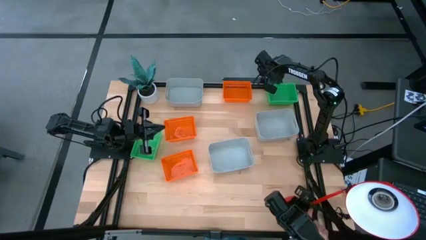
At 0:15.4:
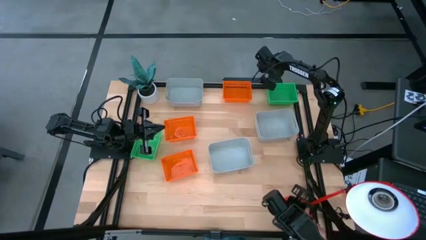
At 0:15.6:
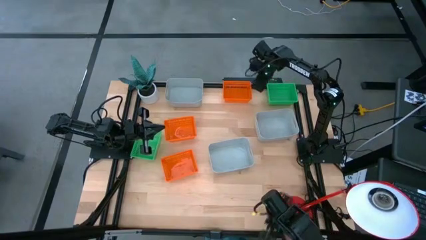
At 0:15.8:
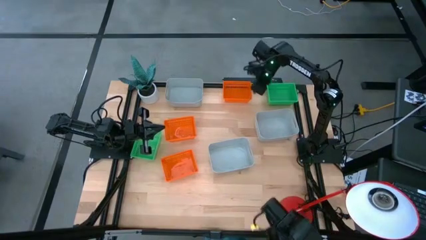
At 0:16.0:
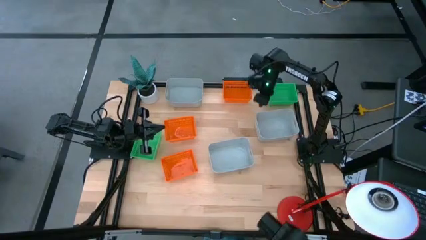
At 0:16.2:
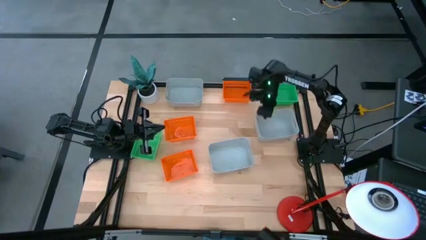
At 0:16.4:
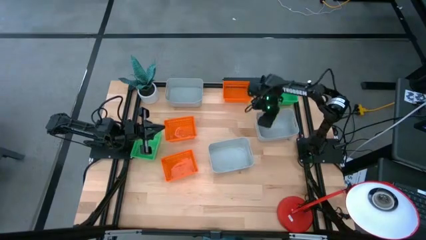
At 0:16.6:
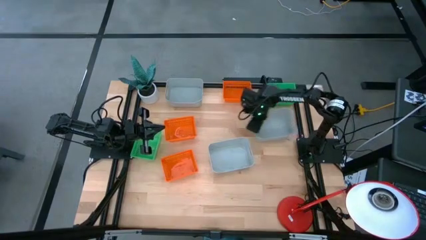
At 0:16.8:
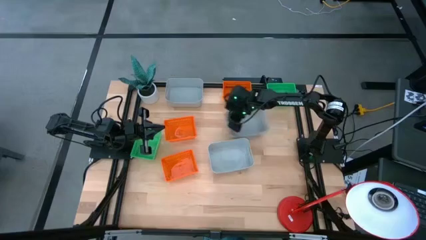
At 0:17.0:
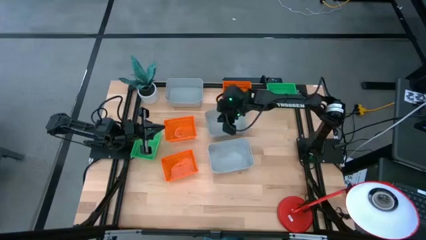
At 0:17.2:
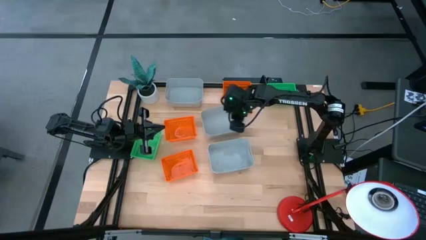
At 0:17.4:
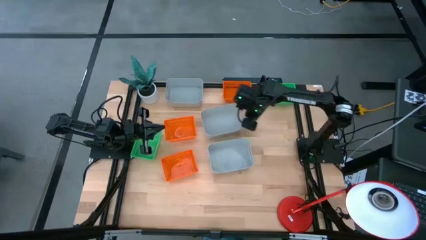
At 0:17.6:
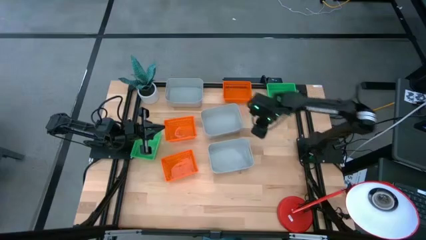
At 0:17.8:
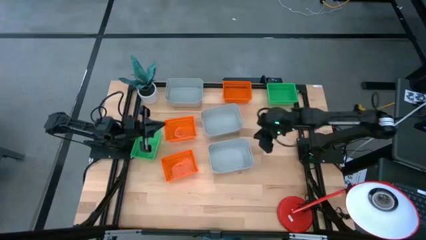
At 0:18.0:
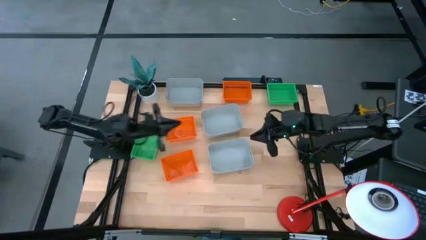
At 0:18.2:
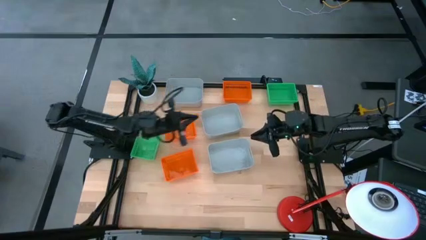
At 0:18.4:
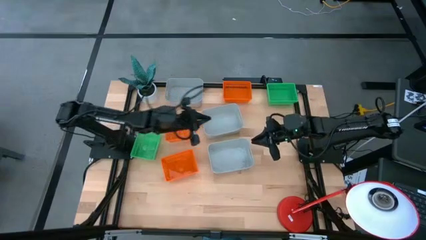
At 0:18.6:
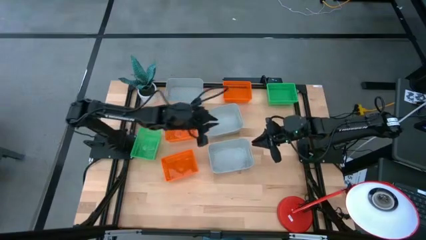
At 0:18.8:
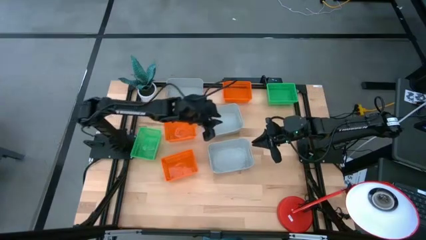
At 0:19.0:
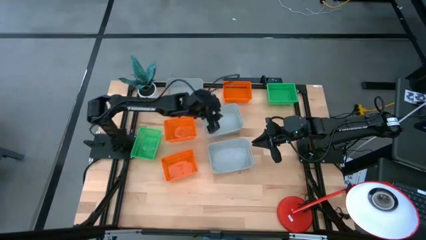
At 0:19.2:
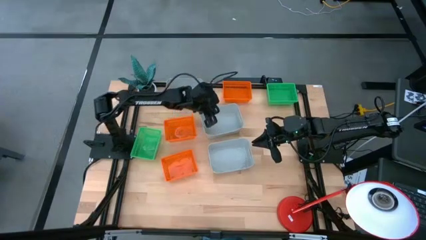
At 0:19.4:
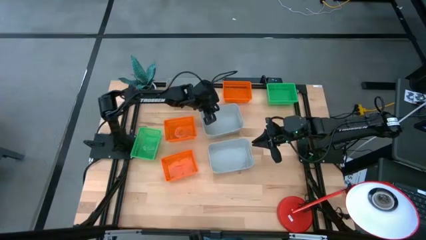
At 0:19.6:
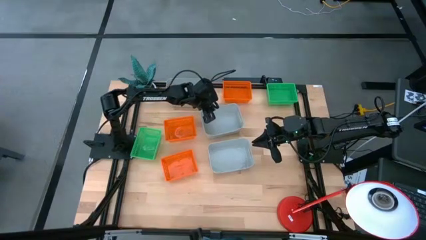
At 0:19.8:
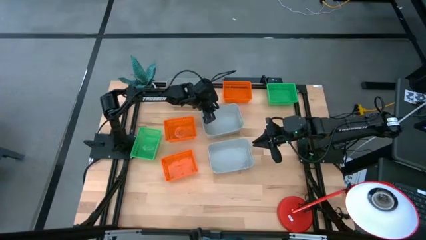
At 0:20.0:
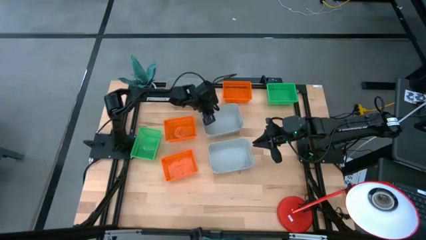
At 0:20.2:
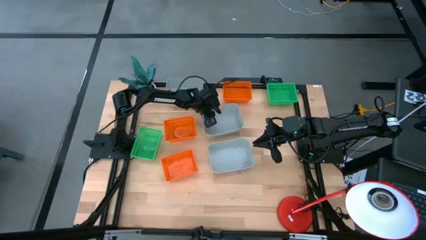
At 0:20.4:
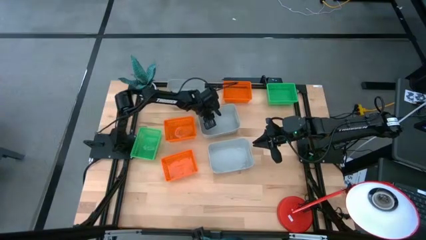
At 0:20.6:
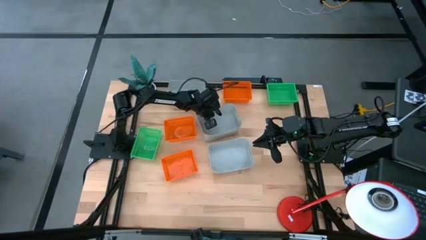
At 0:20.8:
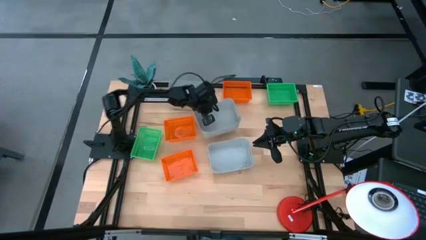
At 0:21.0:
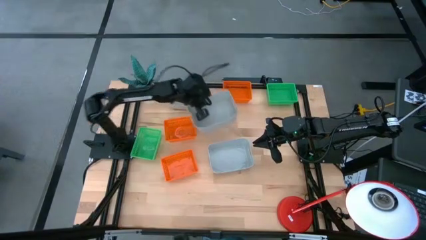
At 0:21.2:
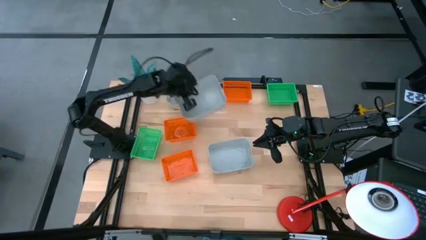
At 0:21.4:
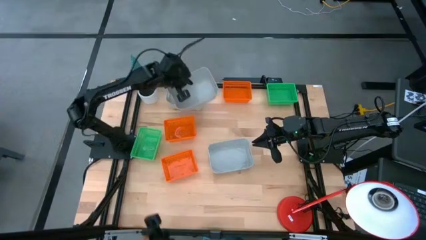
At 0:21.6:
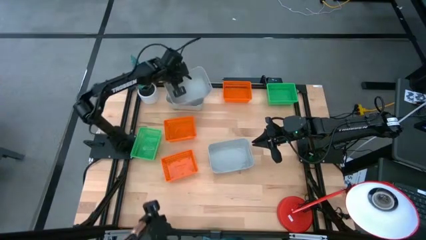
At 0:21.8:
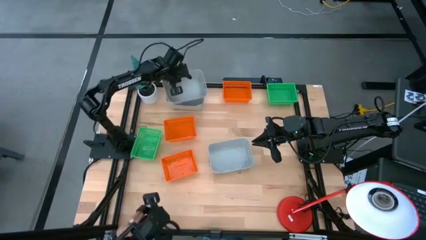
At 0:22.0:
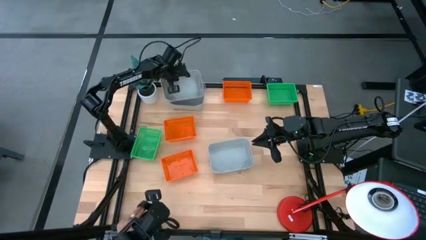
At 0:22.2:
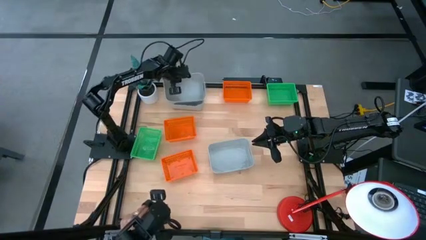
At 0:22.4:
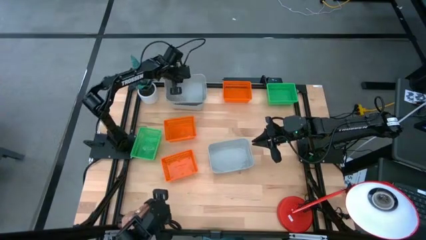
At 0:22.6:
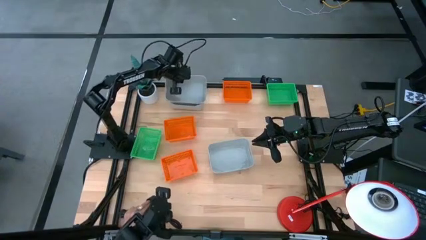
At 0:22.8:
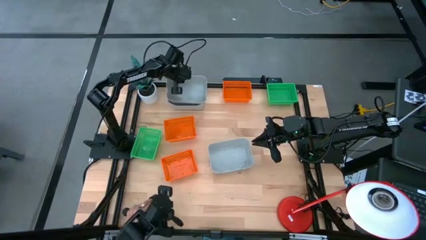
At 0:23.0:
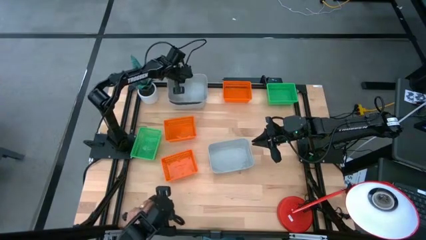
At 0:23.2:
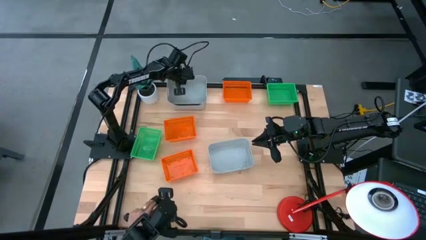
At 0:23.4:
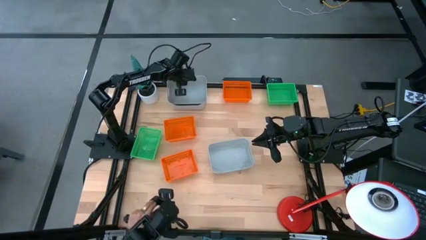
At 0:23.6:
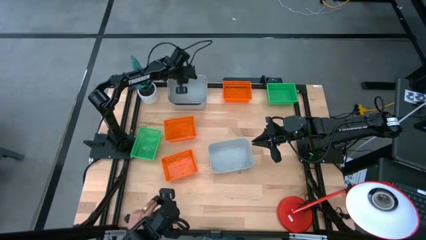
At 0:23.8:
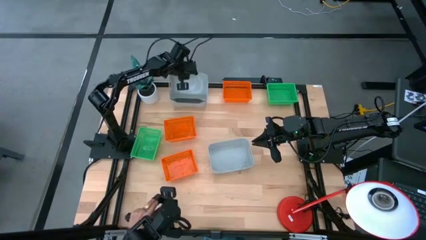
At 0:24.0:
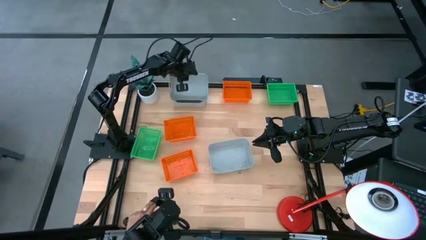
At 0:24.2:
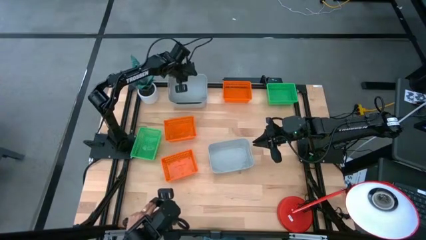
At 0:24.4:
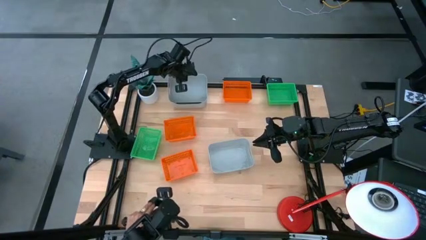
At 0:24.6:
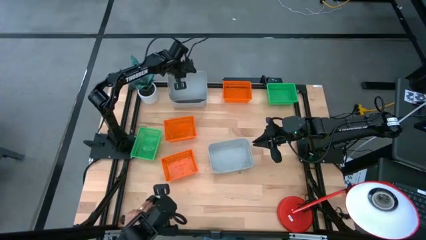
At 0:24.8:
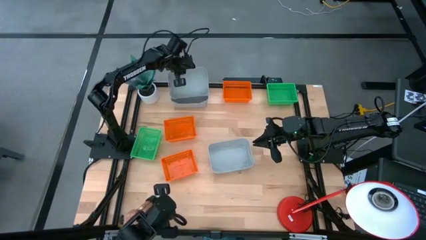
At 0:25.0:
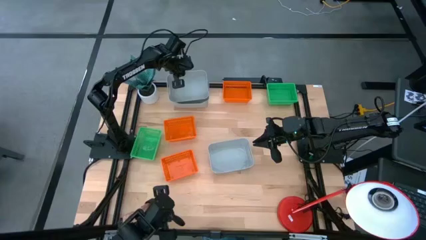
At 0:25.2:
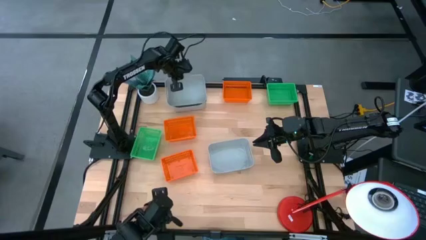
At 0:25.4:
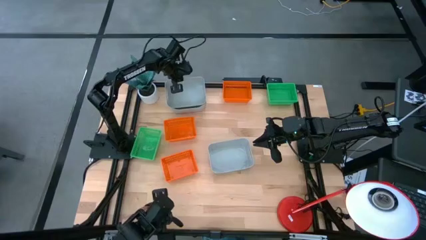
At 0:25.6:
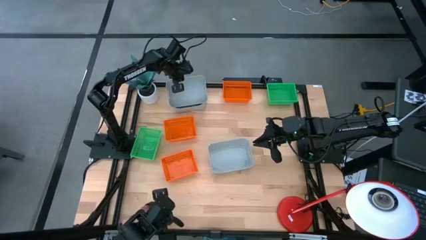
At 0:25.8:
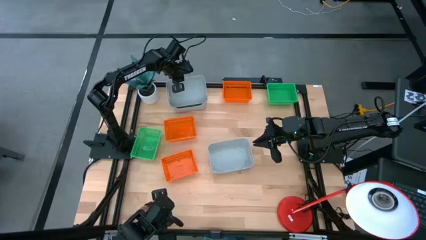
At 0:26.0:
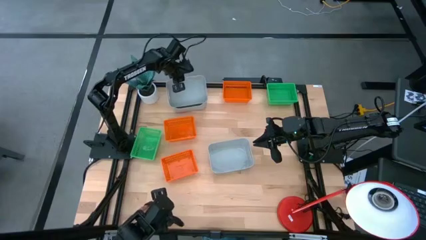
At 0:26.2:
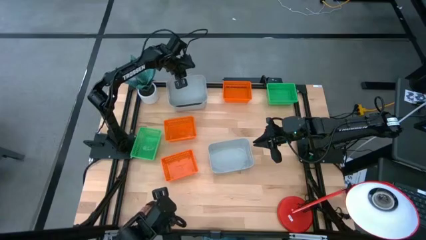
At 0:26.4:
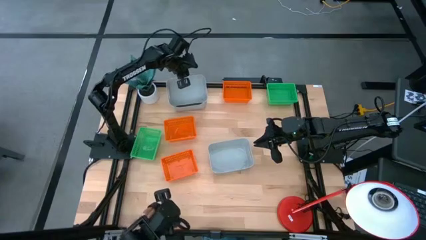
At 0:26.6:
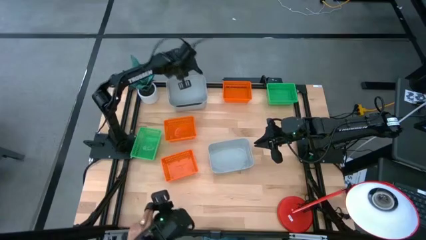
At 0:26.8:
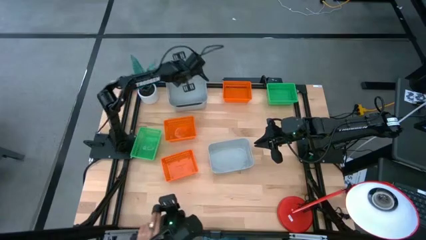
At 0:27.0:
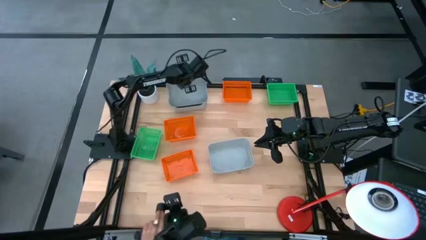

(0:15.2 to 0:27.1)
Stack the middle gray bin on the top gray bin

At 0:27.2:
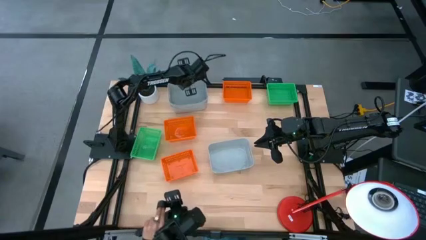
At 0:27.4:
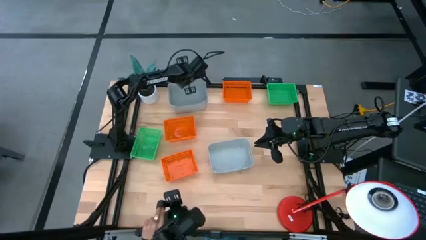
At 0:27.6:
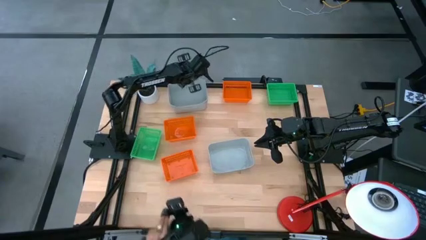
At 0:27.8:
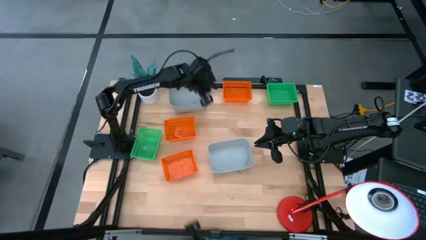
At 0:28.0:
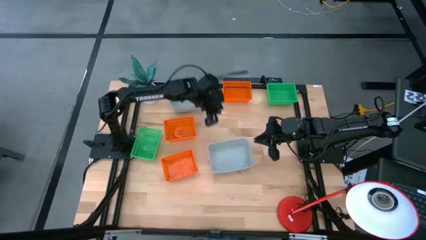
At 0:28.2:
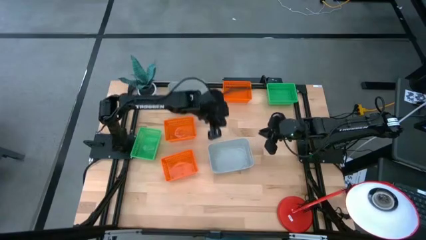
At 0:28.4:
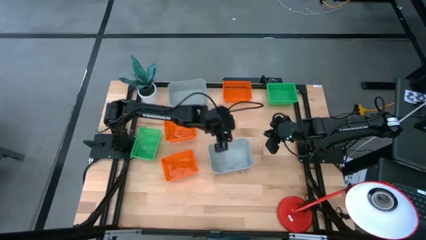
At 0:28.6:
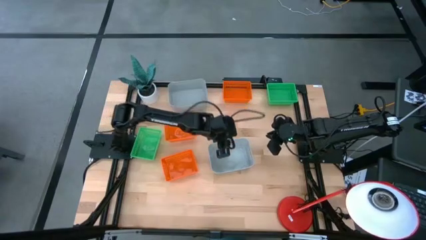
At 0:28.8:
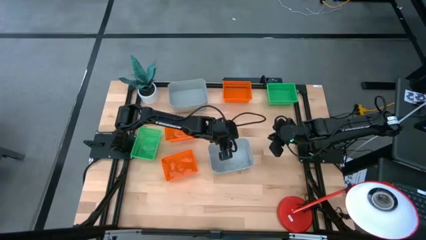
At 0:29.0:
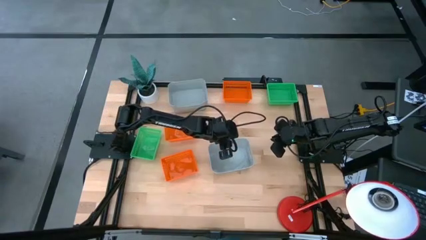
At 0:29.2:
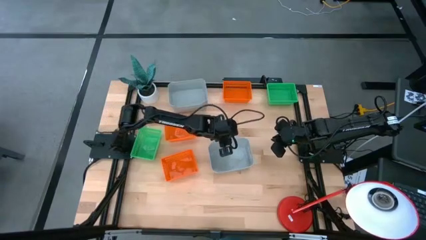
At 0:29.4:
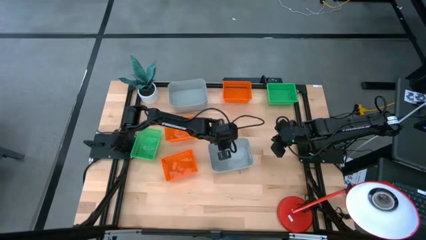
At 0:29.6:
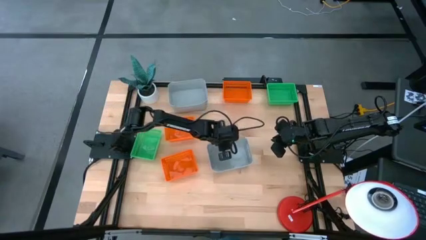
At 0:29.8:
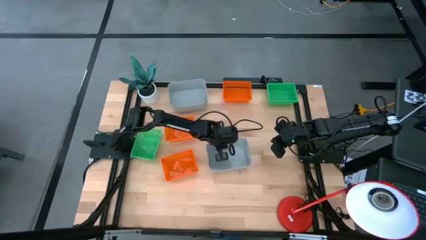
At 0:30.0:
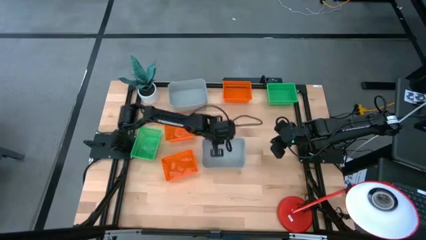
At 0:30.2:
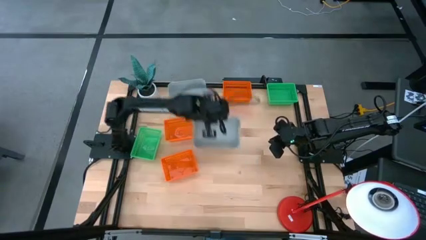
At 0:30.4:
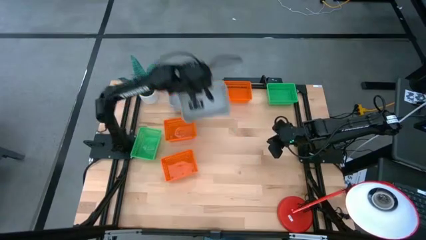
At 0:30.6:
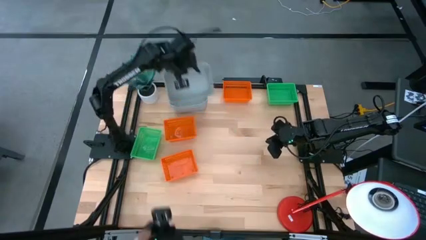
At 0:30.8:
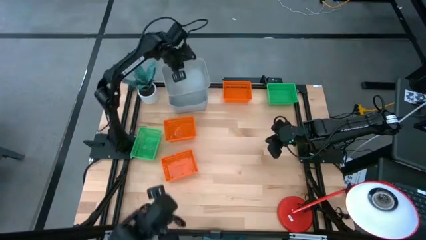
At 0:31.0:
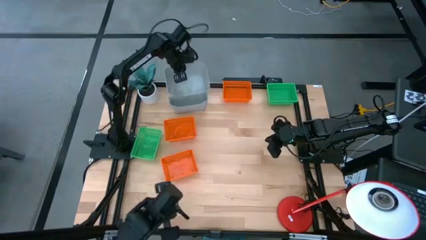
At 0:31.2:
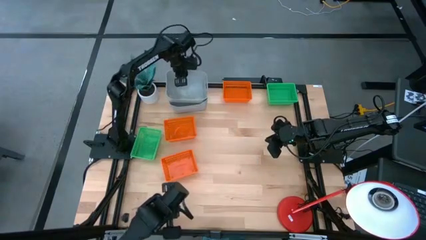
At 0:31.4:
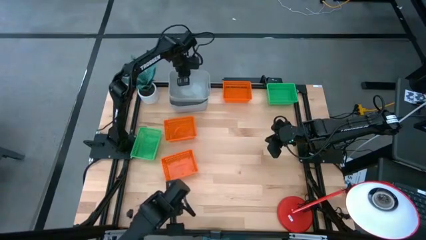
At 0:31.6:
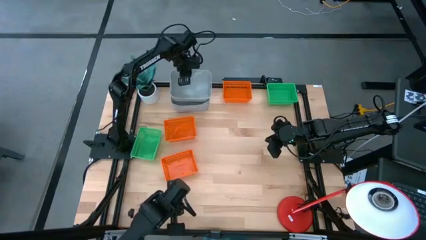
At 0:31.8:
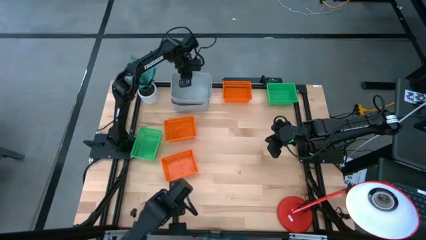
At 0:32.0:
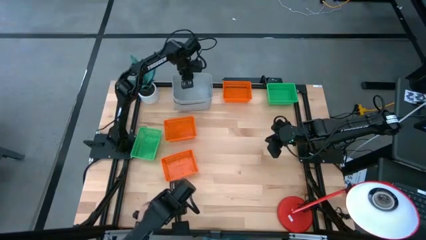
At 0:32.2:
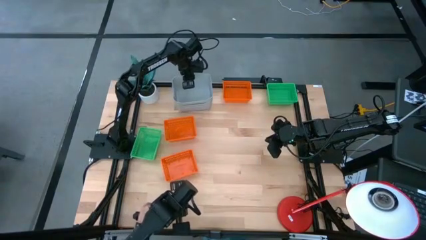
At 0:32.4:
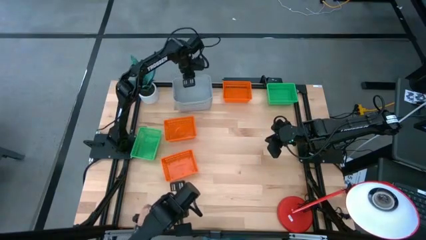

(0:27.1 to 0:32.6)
Stack the gray bin on the gray bins

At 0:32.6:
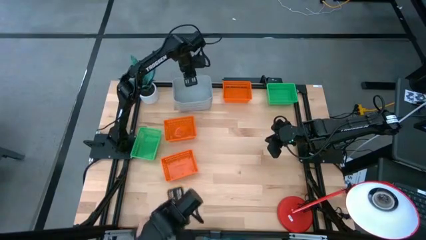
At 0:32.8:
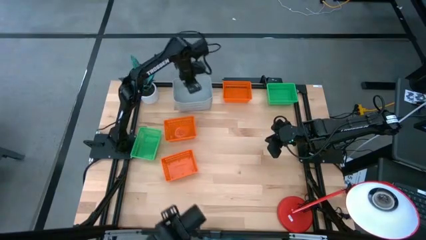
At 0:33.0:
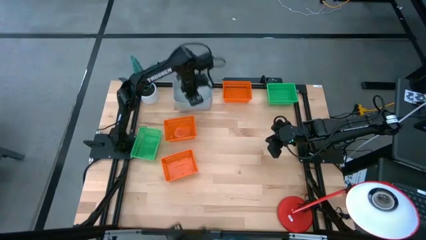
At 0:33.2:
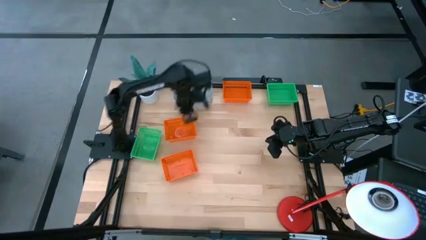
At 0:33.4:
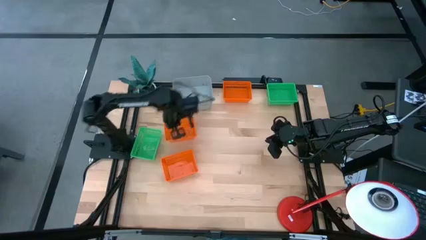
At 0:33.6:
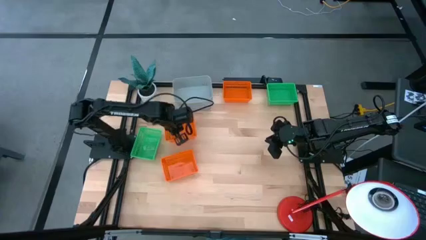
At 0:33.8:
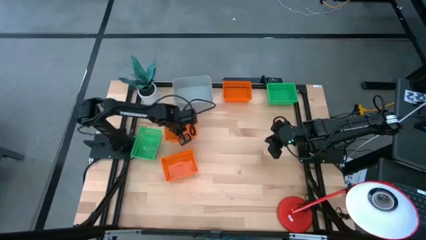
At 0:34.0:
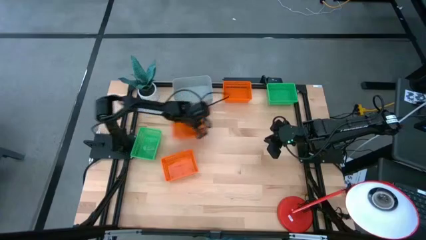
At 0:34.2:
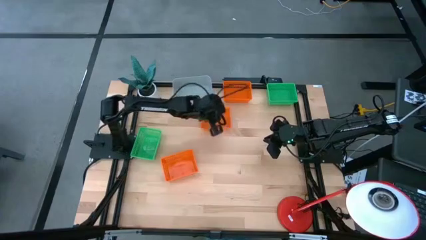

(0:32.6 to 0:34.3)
Move the middle orange bin to the center of the table
